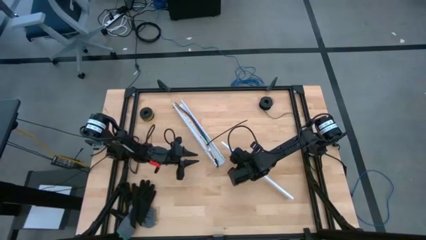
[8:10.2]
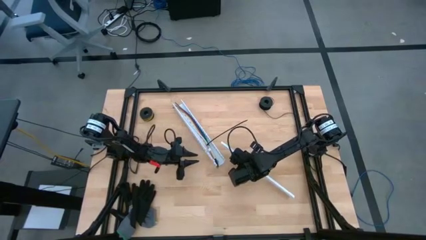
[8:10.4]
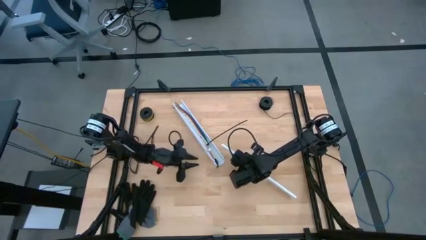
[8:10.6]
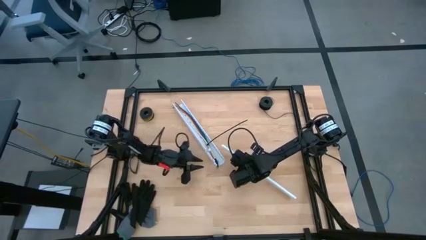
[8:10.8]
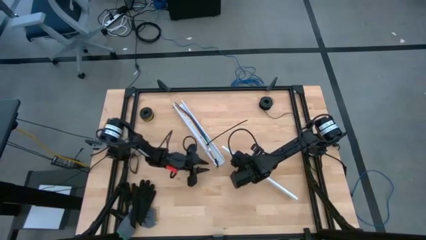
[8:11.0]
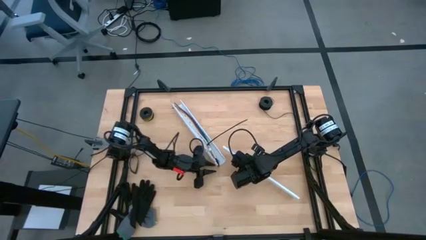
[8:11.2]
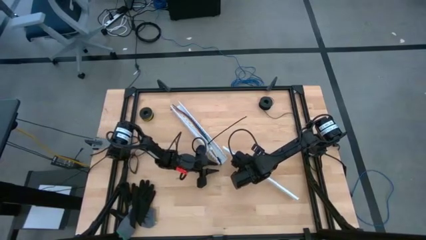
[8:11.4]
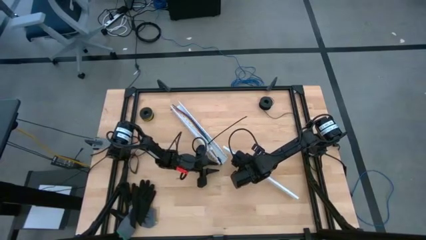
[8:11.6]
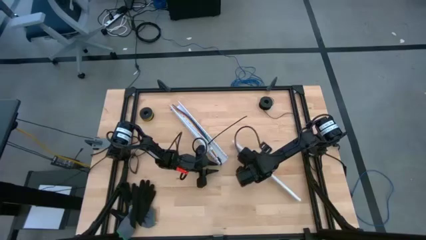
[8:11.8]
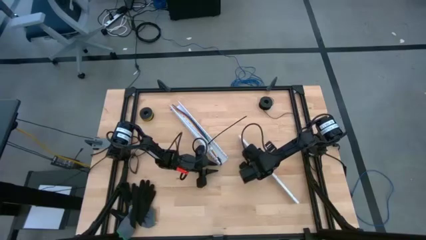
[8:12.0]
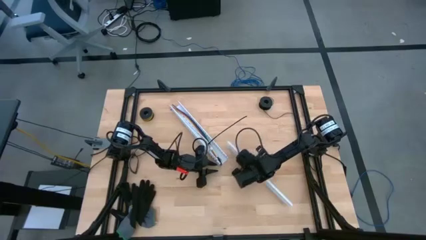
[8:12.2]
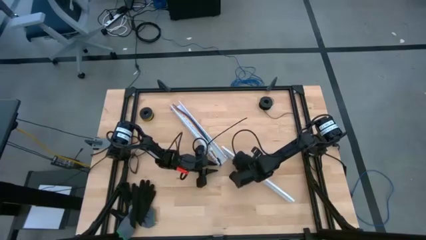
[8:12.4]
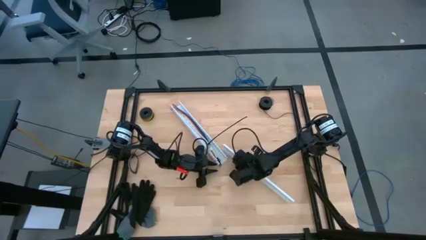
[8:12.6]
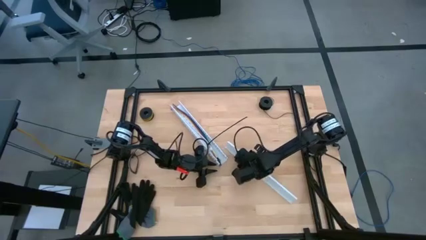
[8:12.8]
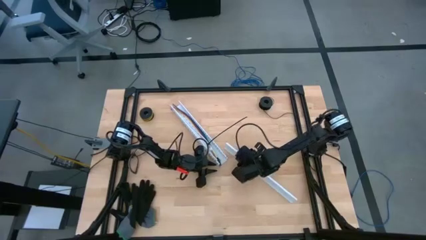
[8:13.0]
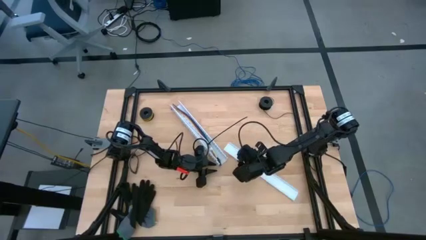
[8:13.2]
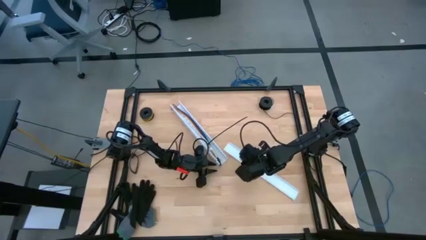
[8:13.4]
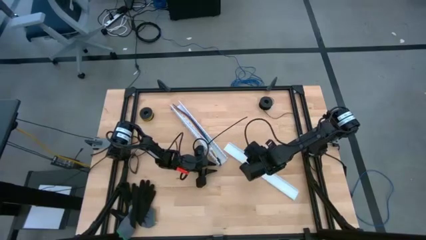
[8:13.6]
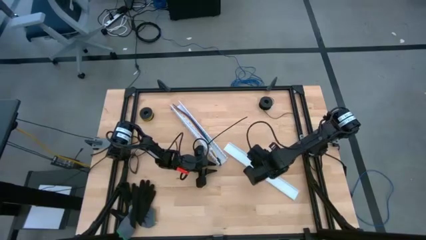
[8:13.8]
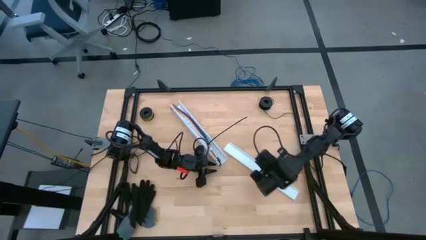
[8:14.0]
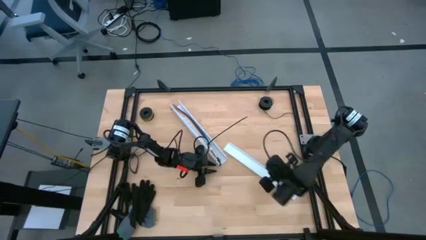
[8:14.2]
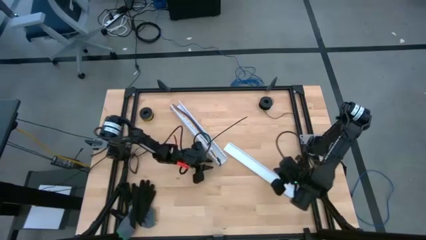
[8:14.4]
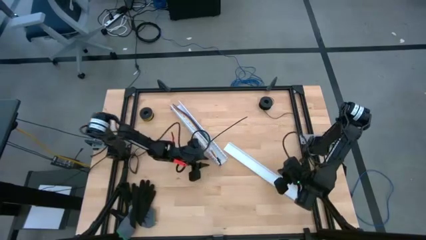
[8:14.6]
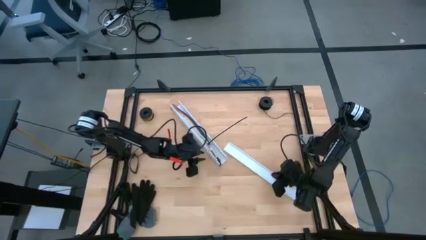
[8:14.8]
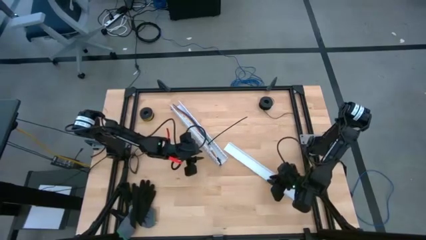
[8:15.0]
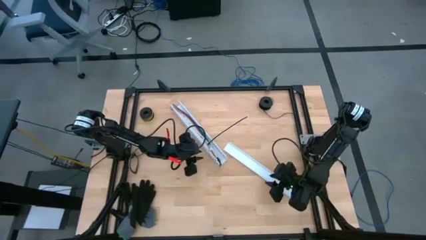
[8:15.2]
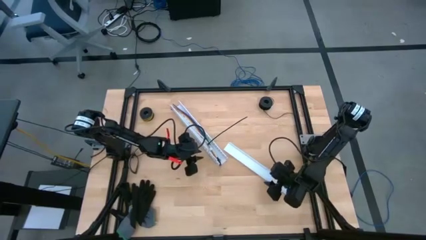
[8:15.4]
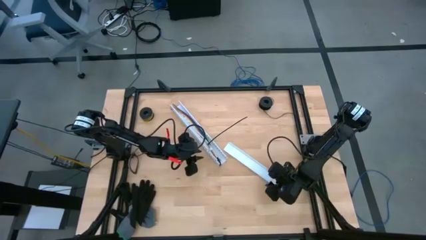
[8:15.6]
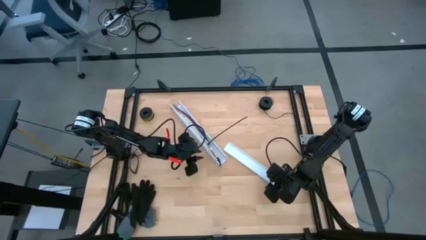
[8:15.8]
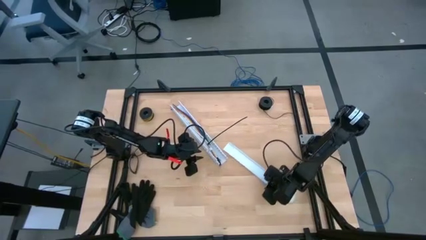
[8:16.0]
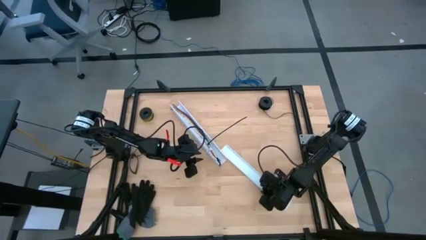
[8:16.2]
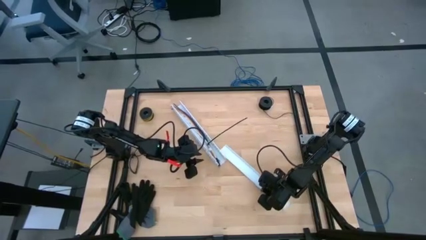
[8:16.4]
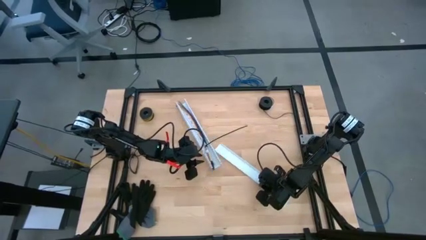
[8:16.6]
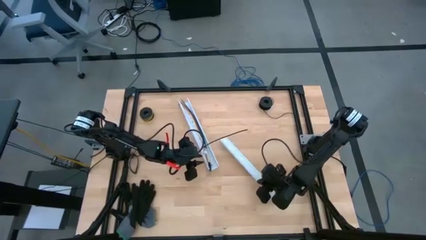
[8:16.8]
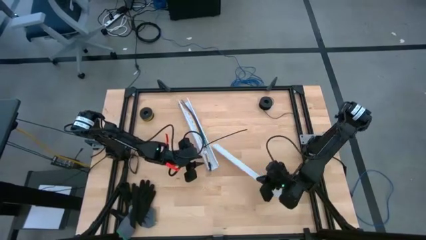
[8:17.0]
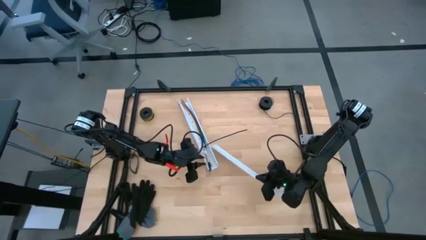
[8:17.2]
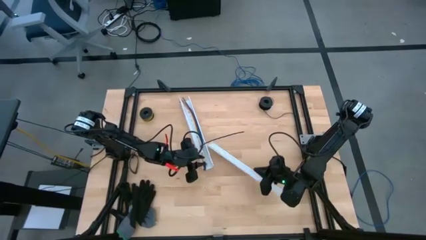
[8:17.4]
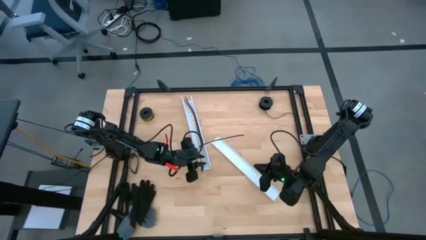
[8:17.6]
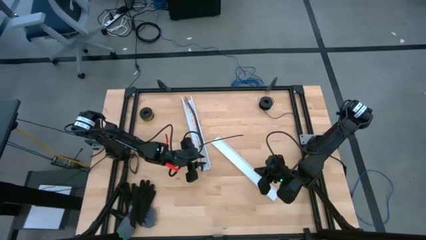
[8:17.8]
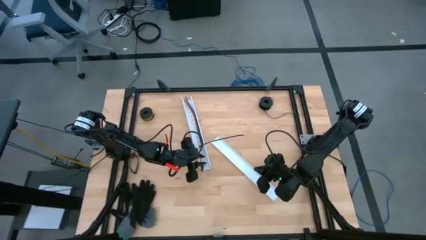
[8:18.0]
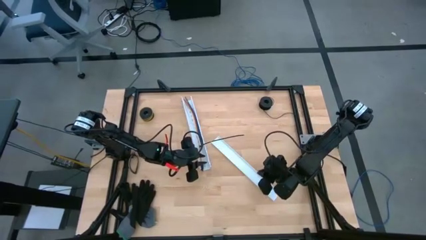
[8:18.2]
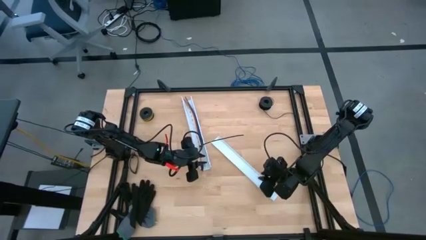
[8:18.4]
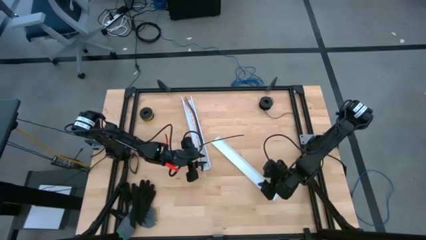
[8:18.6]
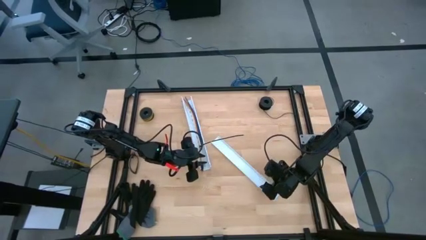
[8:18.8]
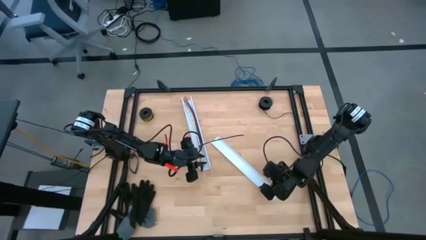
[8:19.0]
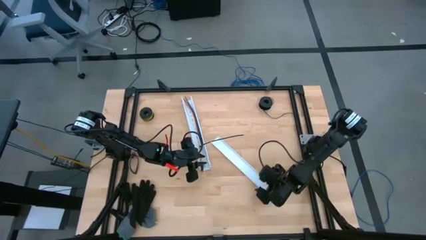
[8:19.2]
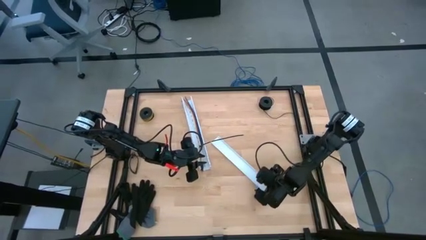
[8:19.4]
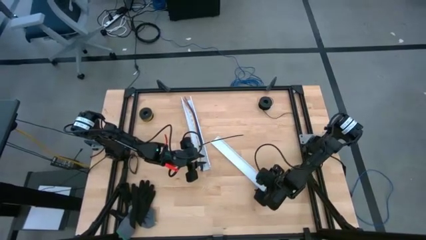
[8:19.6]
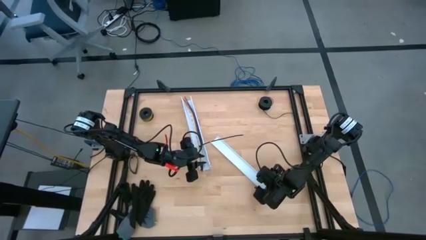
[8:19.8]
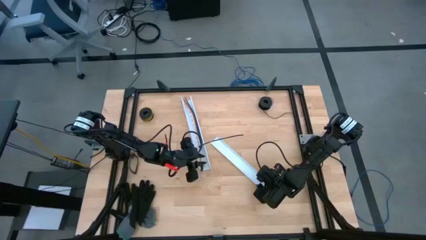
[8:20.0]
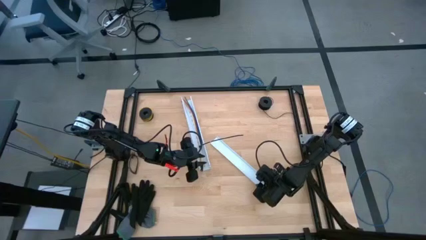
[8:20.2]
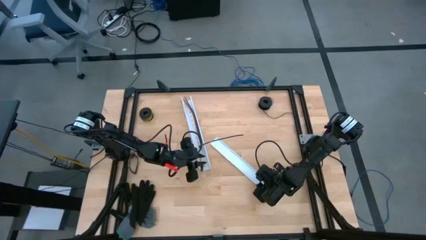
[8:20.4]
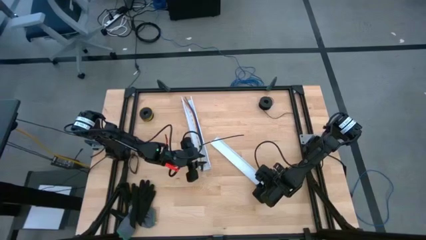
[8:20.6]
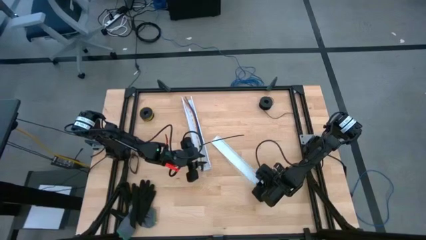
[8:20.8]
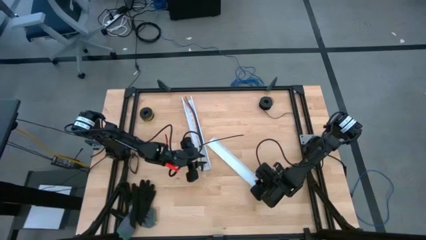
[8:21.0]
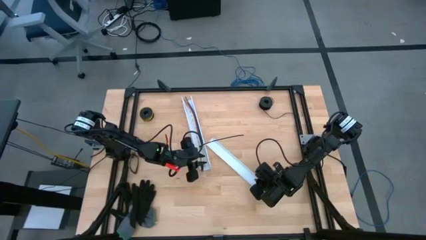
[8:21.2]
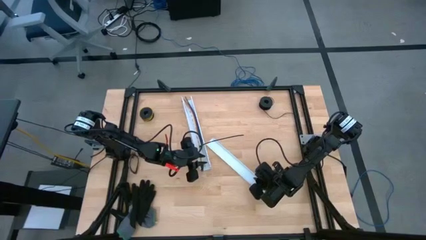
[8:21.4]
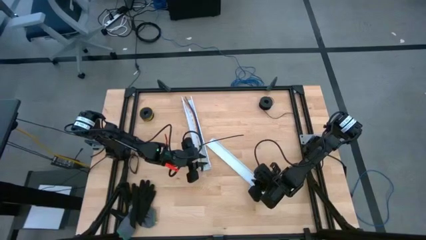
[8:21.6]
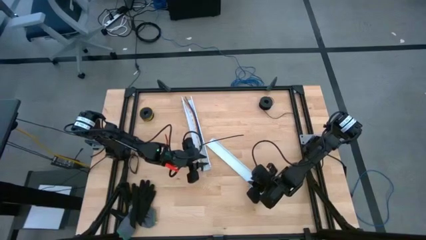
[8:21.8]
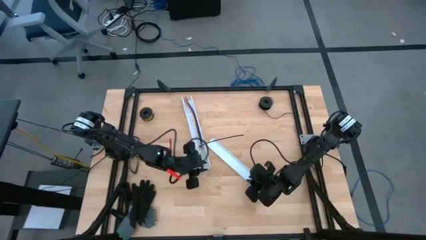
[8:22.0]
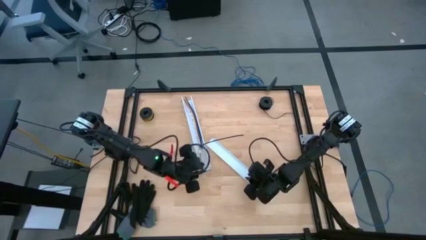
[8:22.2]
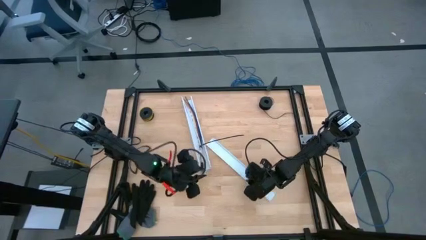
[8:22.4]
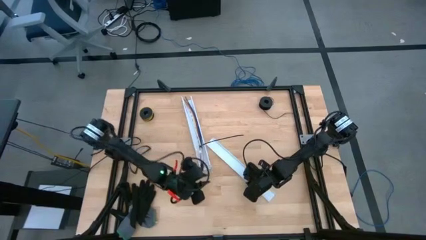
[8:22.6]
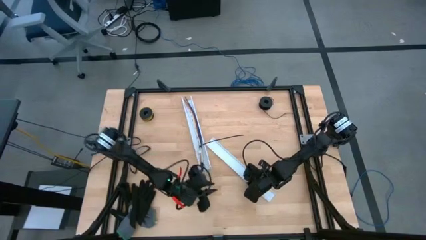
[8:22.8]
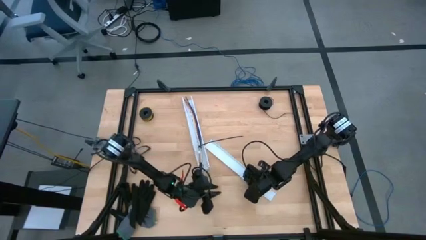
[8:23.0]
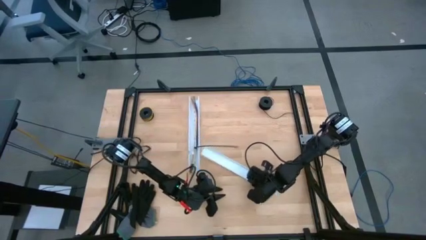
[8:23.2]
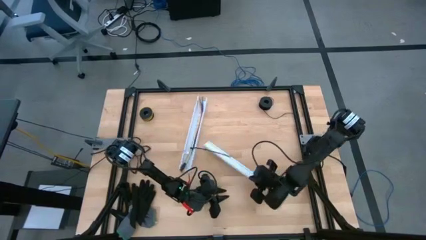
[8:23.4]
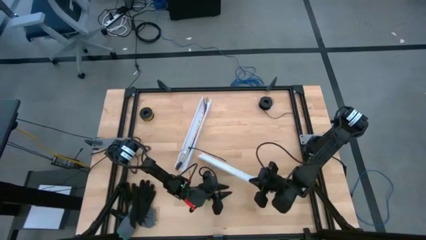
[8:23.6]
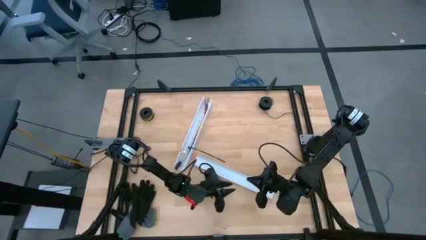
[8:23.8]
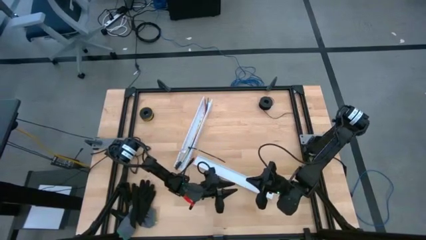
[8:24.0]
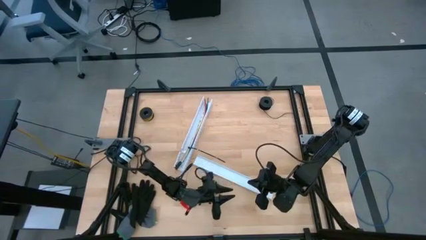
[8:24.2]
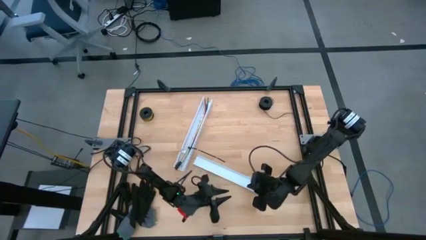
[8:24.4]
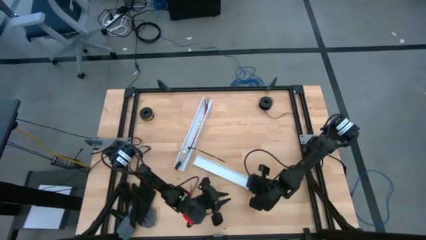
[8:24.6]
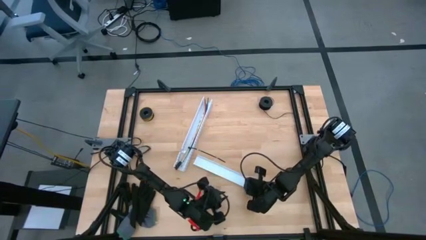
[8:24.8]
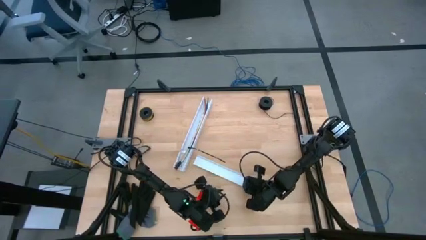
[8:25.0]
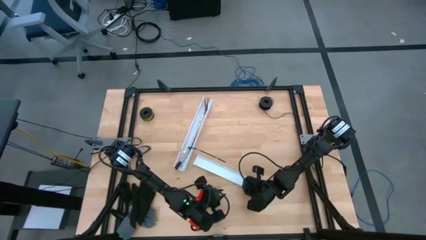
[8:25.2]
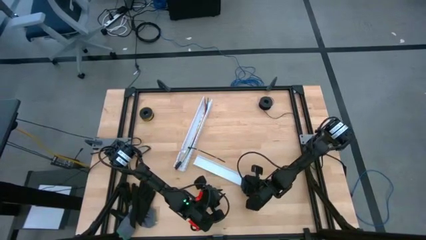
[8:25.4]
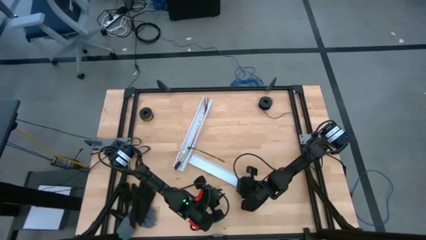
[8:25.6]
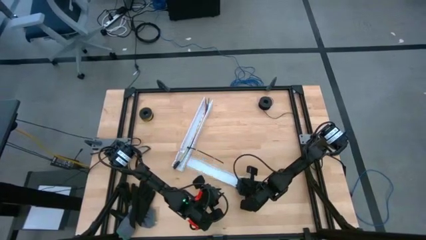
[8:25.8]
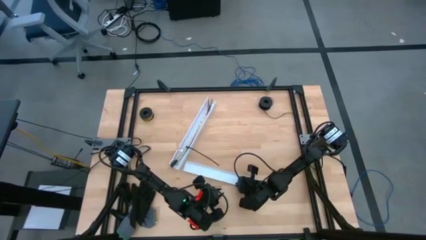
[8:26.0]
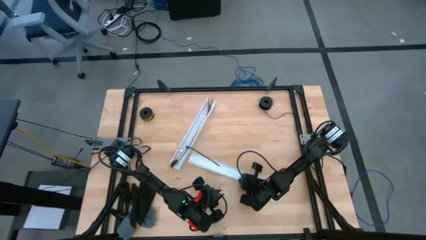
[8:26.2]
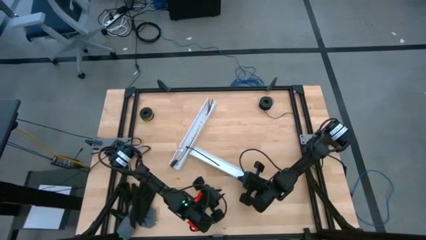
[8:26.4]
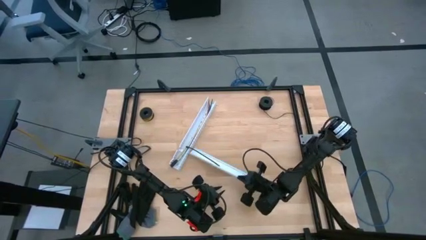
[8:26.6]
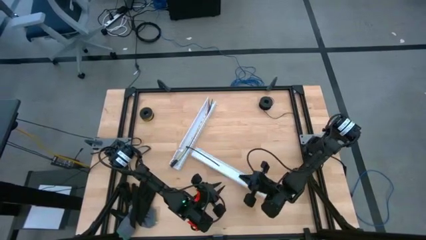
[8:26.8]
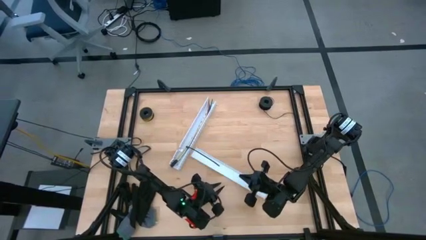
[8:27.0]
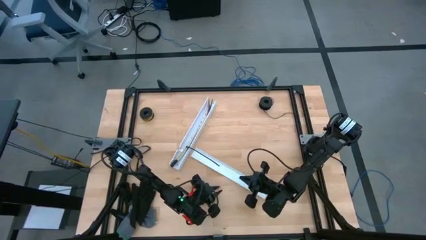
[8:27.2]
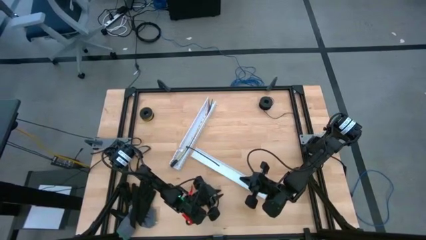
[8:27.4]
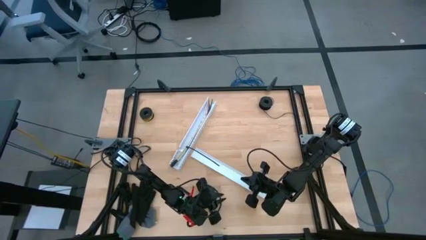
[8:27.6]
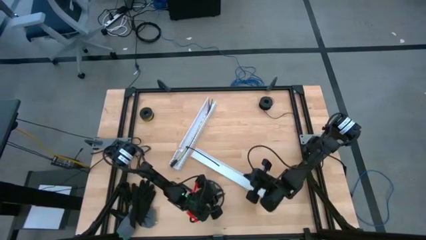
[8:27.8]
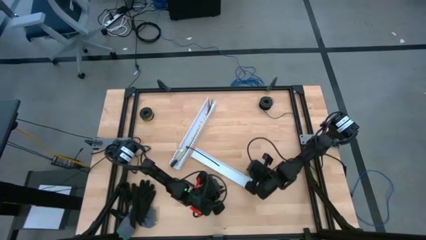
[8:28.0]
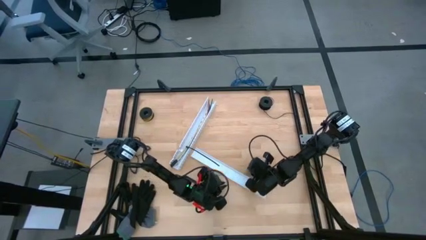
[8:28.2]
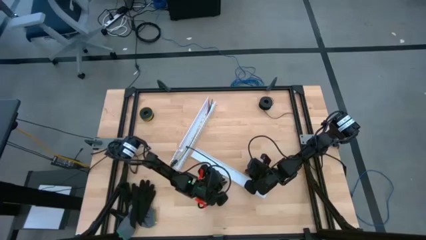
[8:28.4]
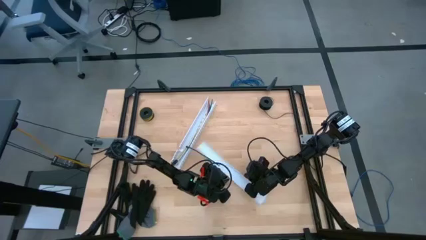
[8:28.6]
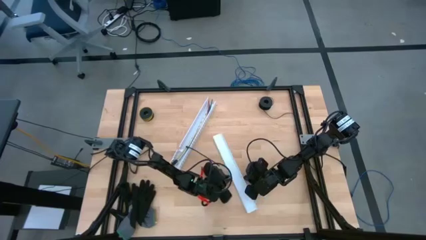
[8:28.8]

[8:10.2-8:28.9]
Task: Ziptie cables
Close the white cable duct
